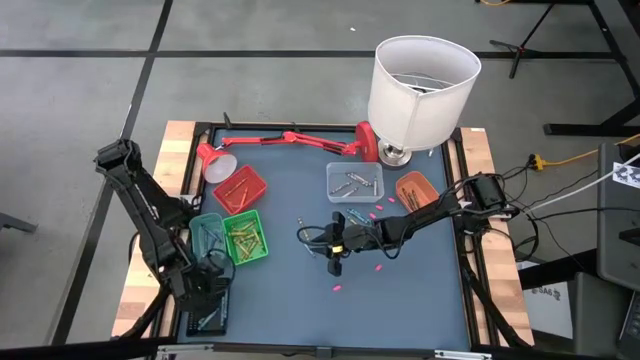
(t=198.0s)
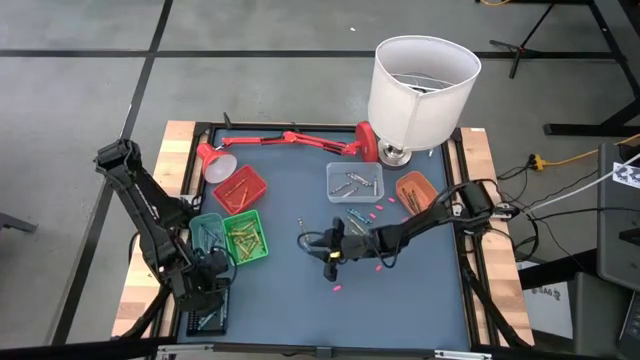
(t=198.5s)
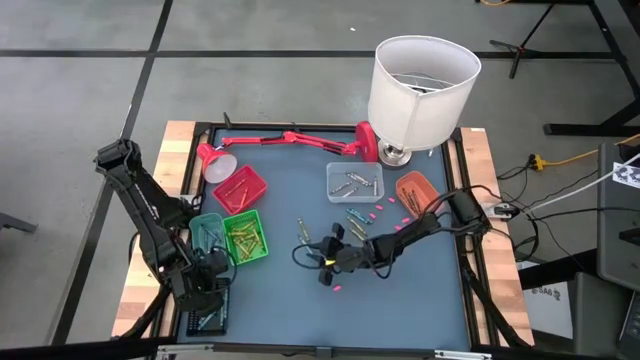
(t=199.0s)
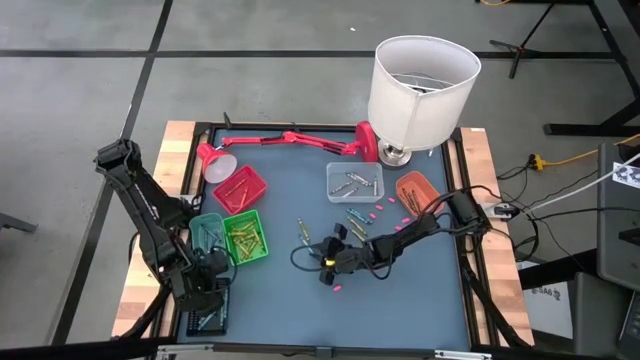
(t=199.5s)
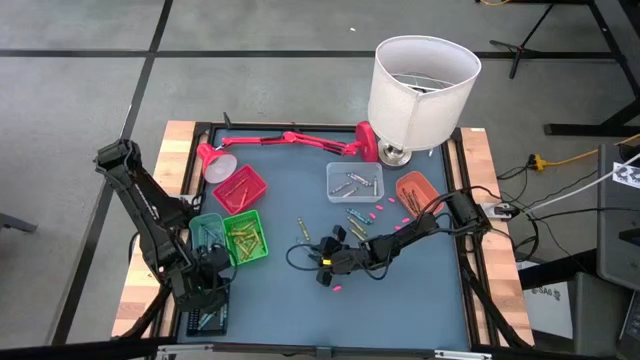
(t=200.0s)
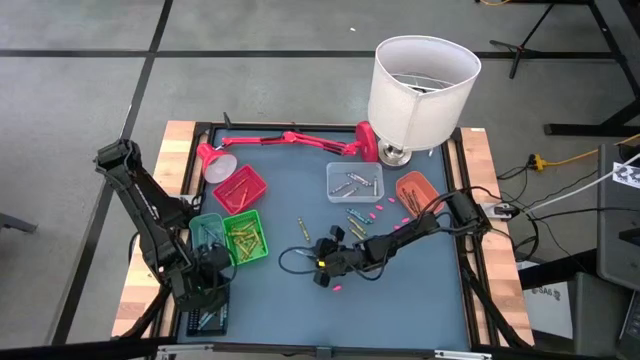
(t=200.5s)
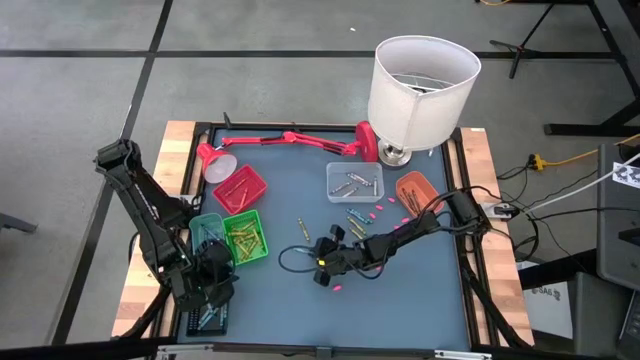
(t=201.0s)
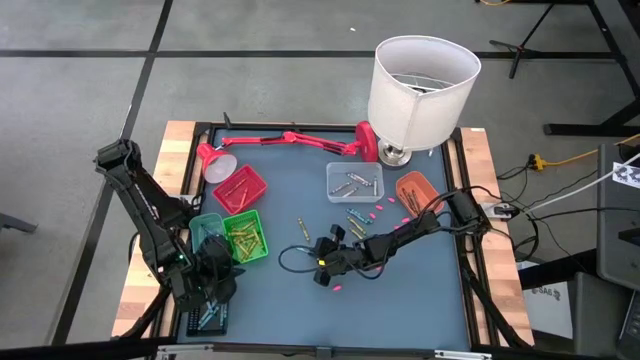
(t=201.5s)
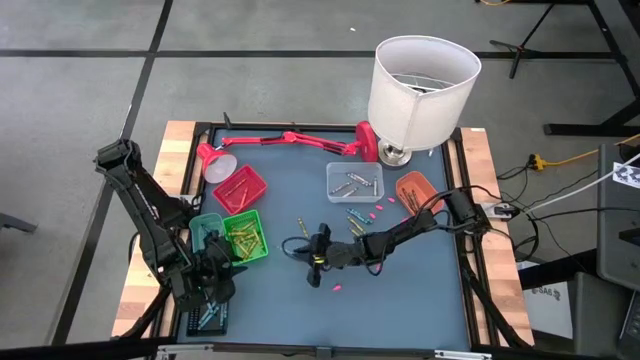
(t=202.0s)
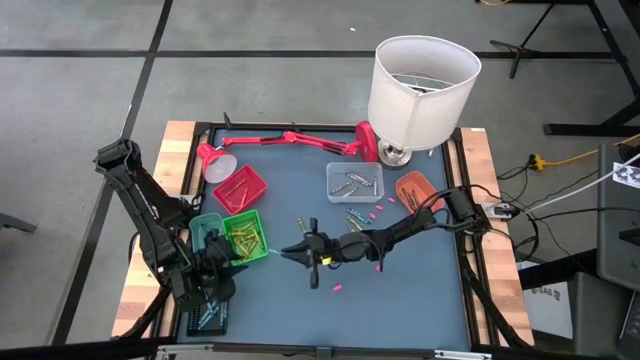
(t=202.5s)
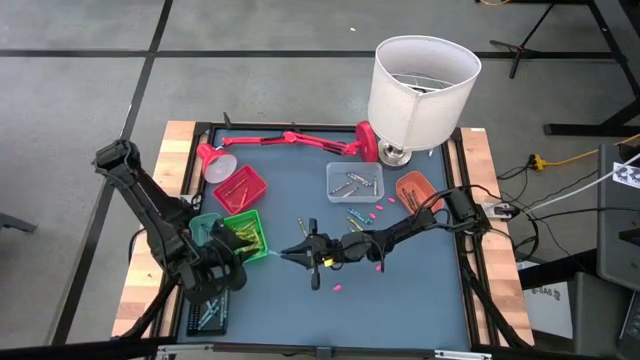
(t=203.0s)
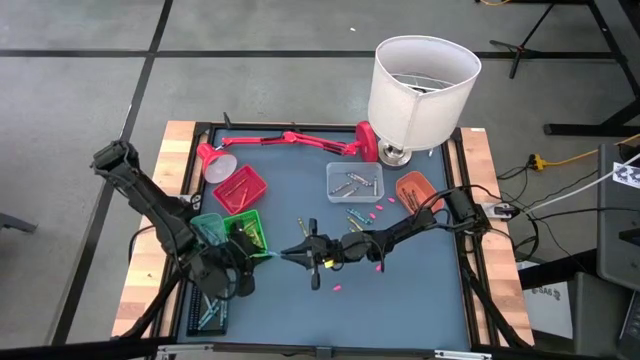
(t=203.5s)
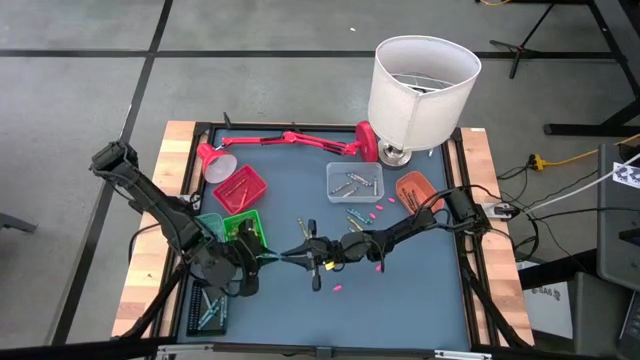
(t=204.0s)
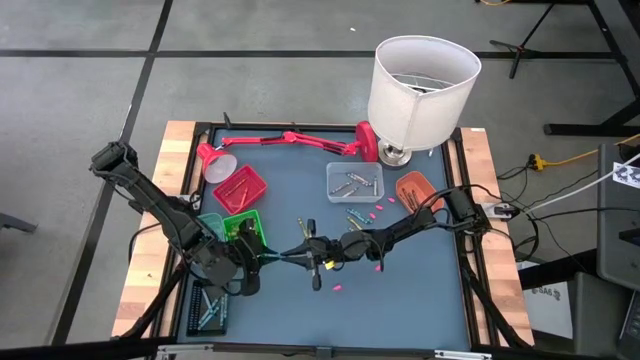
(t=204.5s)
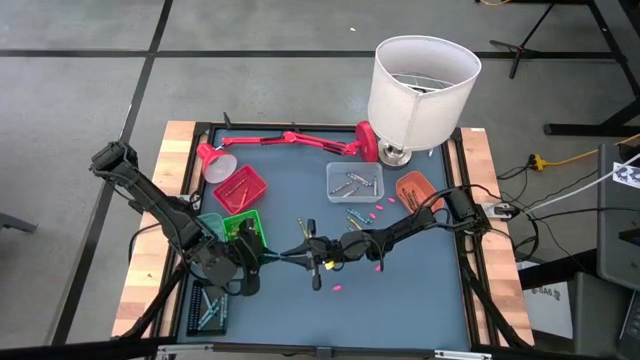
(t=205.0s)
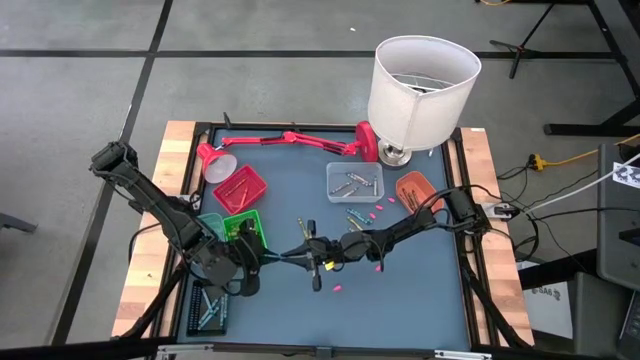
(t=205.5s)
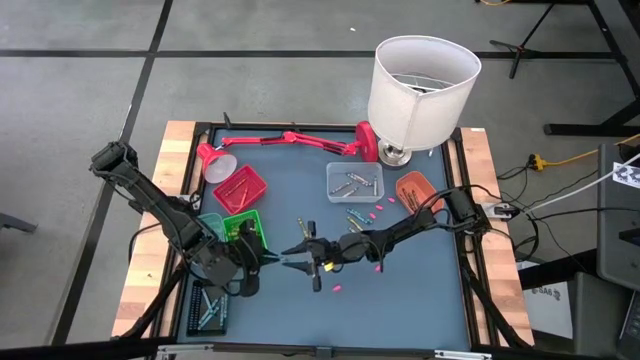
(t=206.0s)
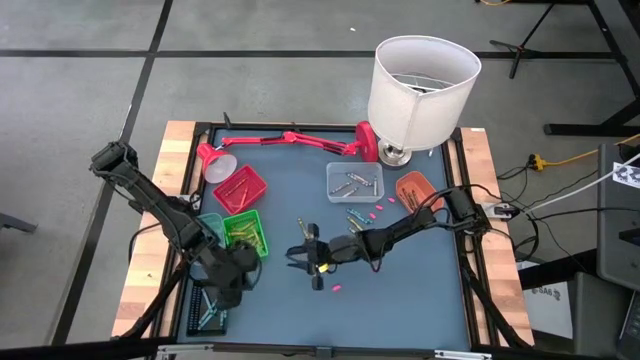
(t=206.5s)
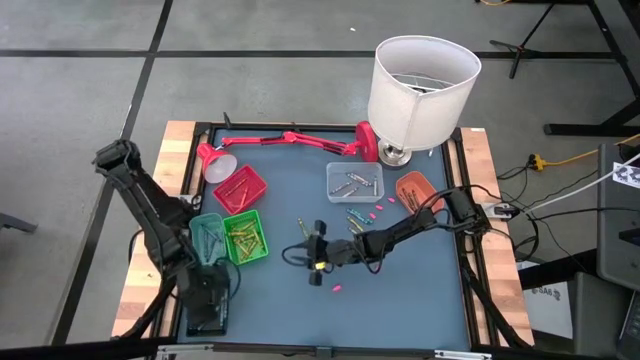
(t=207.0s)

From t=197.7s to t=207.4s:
Task: Sort crayons
Put the dark green crayon into the black bin

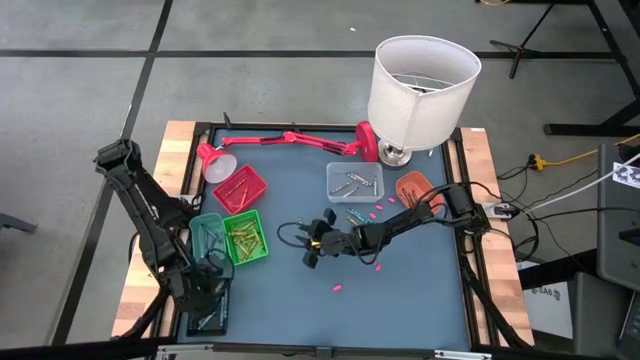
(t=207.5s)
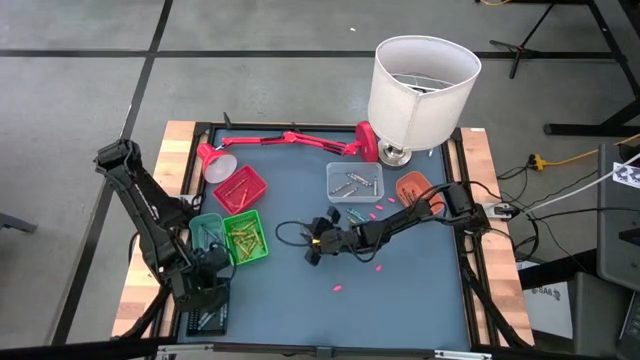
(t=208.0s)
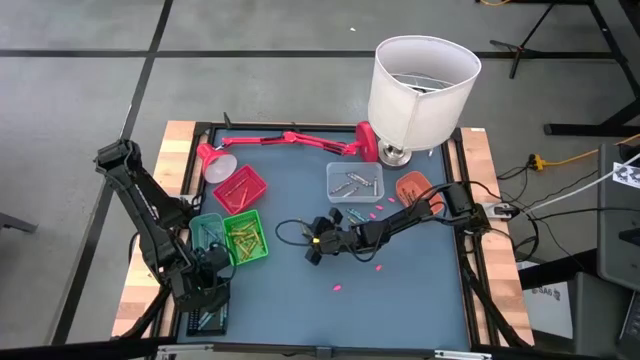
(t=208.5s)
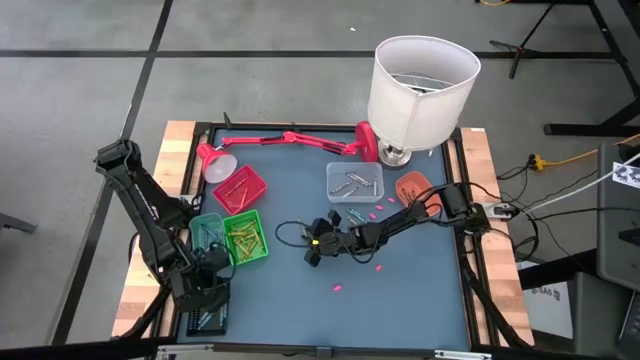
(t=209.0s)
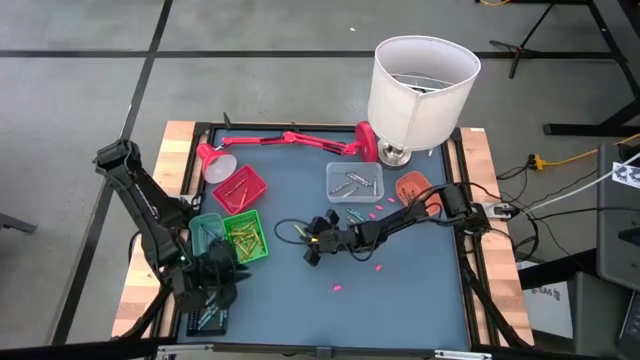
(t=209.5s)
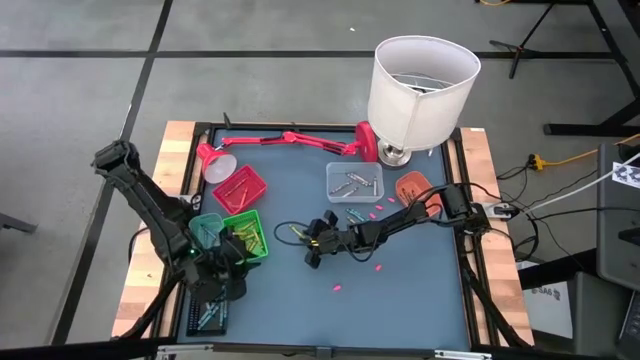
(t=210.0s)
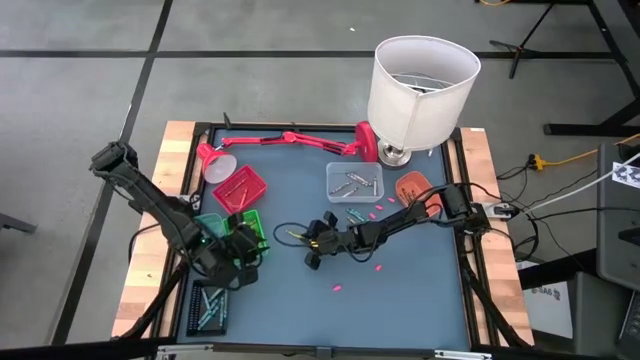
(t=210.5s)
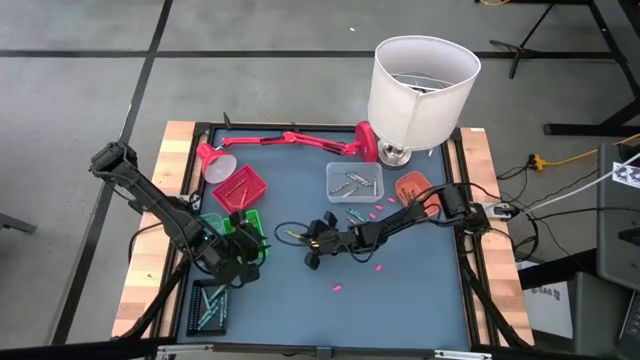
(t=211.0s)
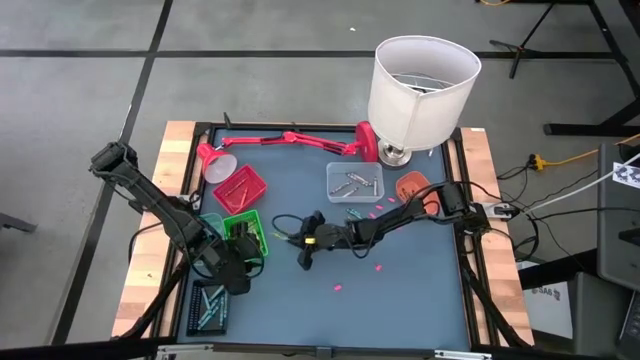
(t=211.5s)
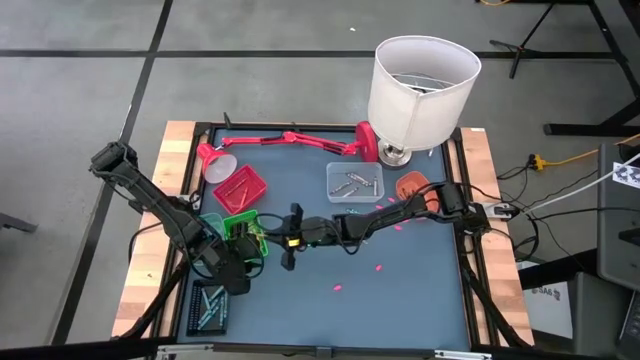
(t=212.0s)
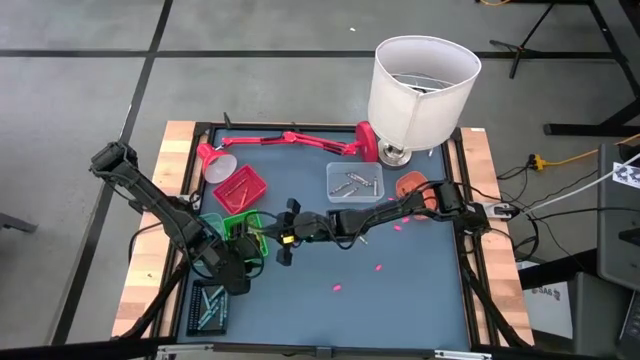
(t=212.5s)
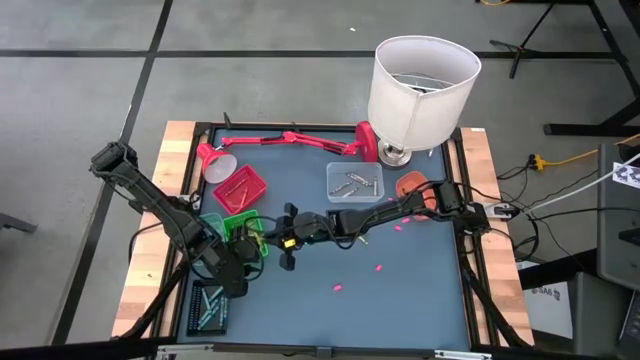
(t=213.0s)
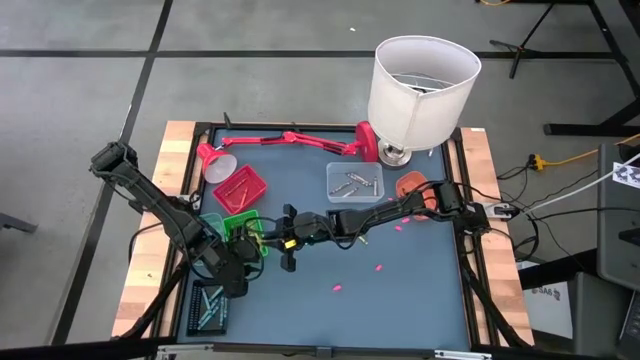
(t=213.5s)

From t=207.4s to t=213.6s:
Put the green crayon into the green bin

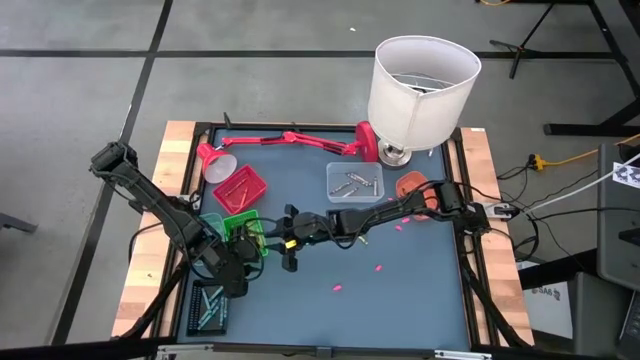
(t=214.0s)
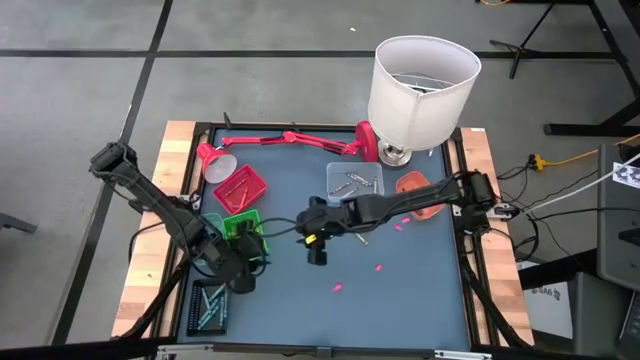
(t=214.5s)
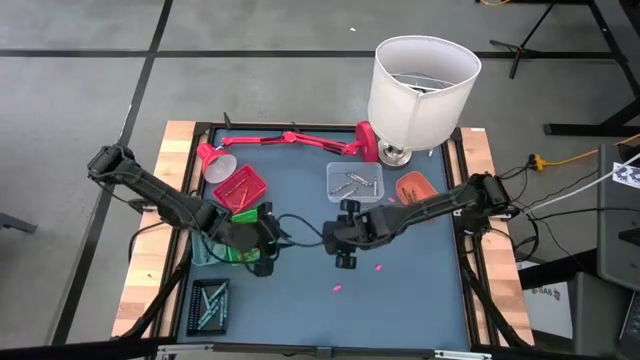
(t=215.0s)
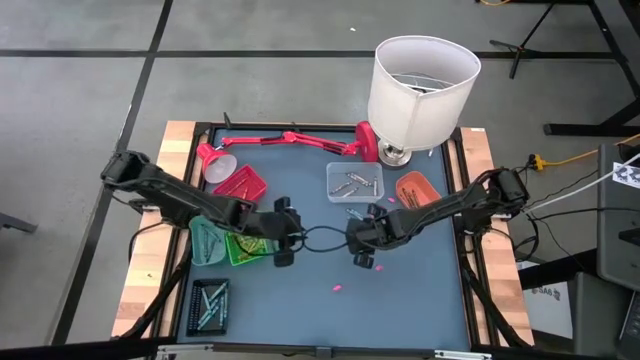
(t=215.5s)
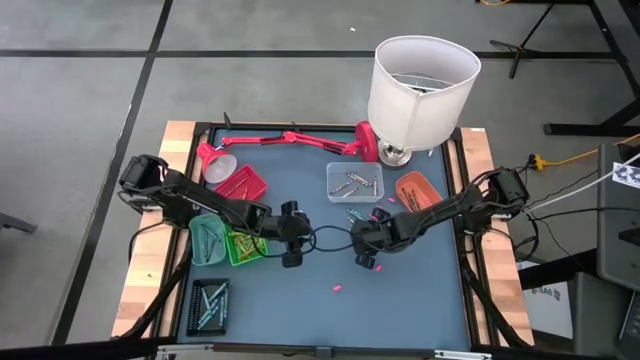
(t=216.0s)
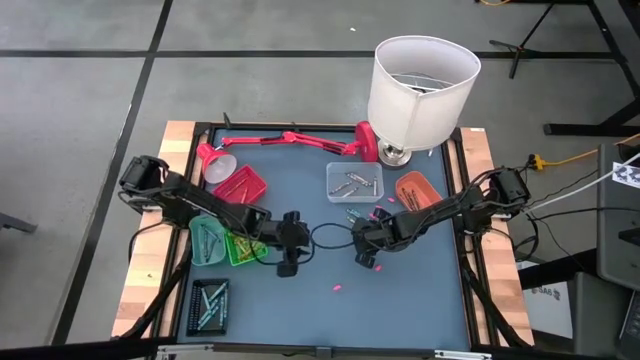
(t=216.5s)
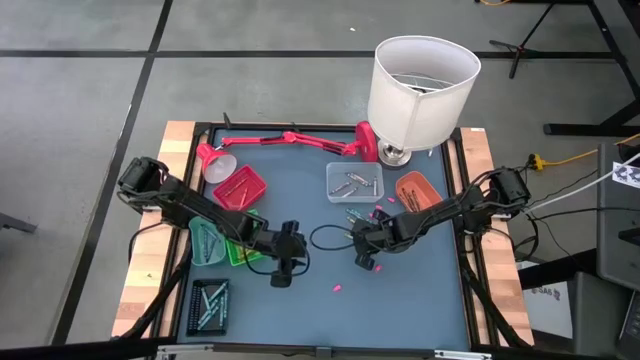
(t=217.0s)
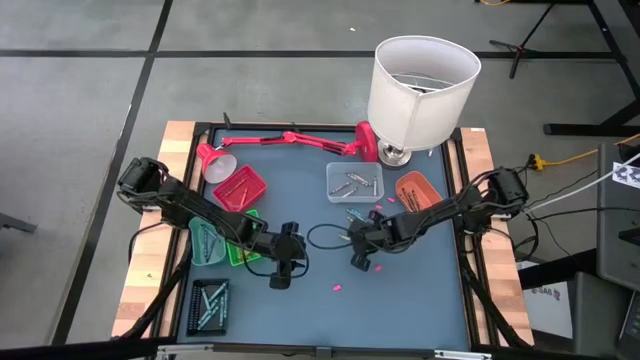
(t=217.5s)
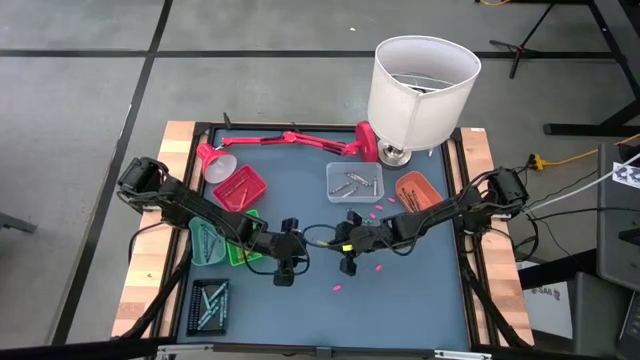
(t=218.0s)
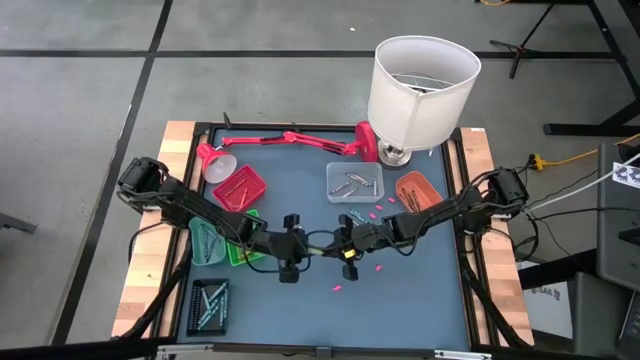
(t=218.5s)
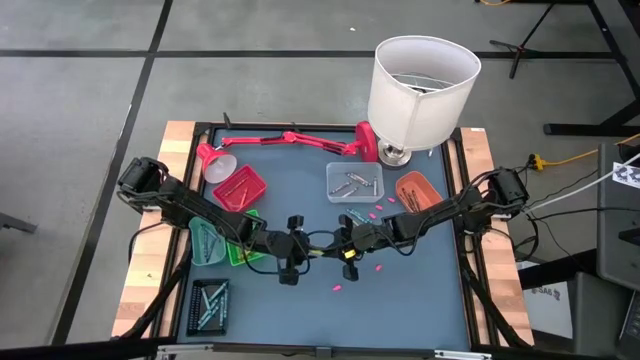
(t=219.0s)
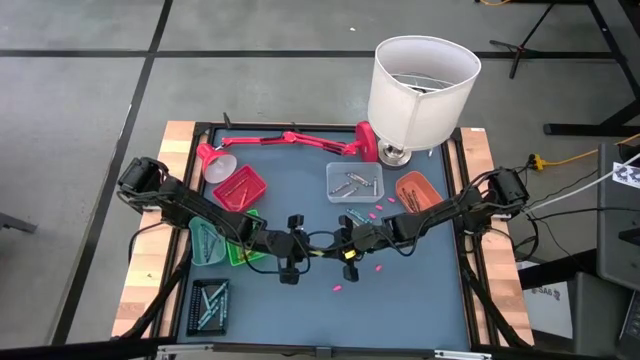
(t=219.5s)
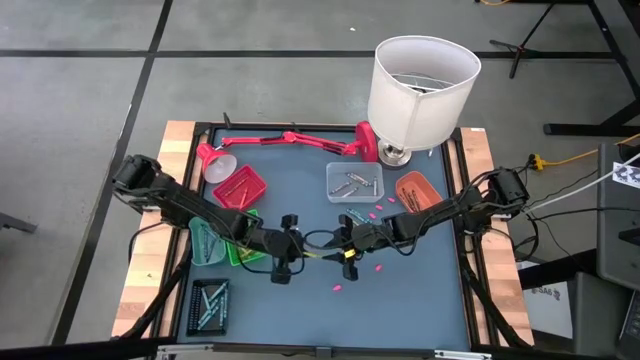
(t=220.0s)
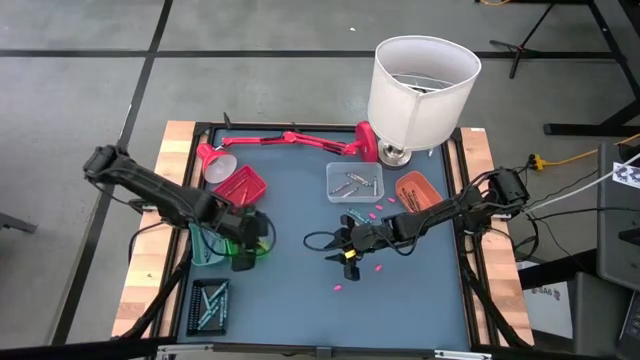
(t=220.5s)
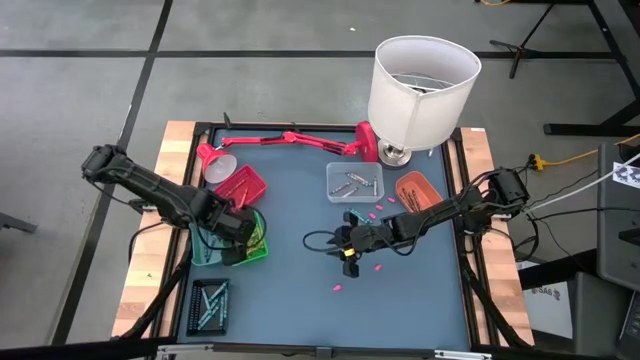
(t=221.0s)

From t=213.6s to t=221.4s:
Put the green crayon into the green bin
